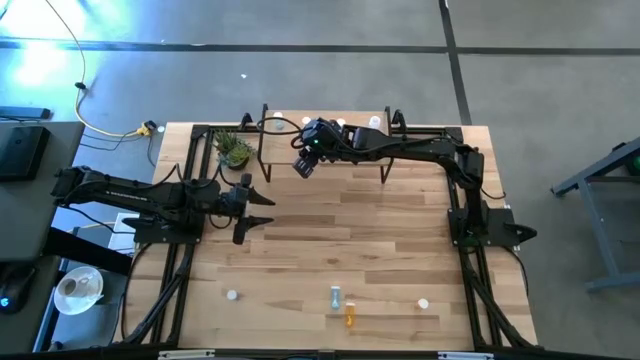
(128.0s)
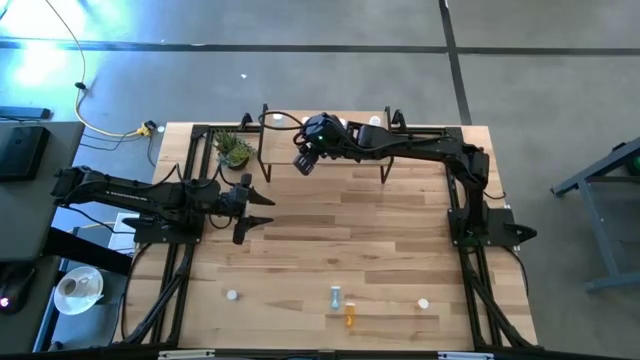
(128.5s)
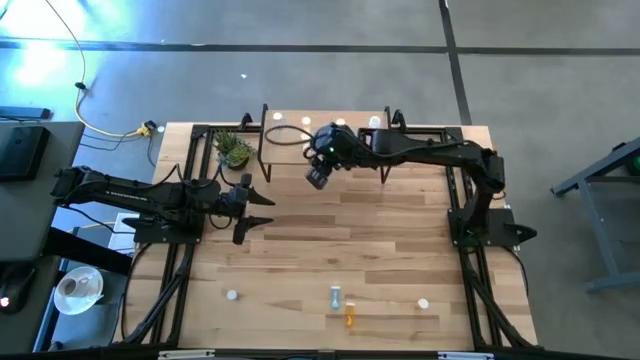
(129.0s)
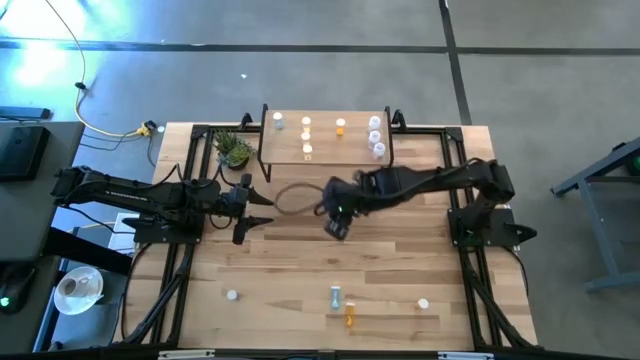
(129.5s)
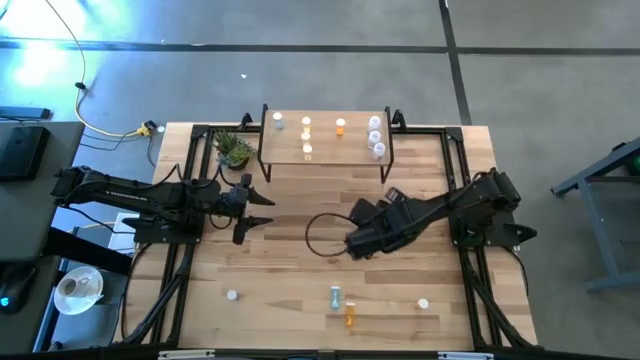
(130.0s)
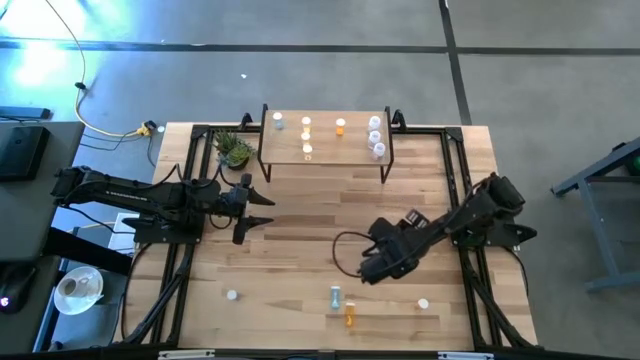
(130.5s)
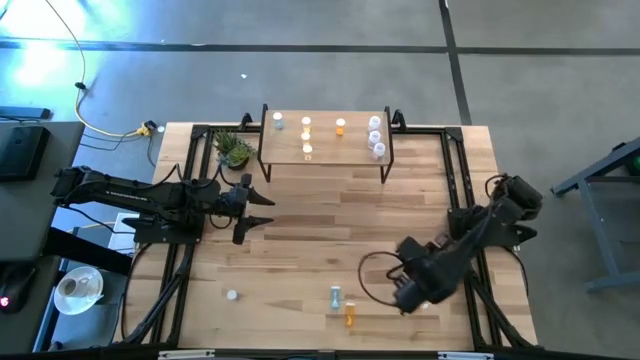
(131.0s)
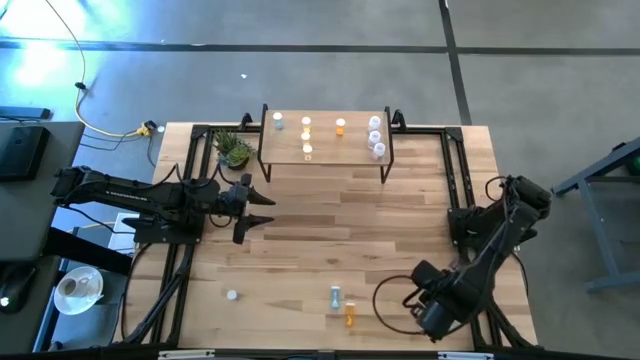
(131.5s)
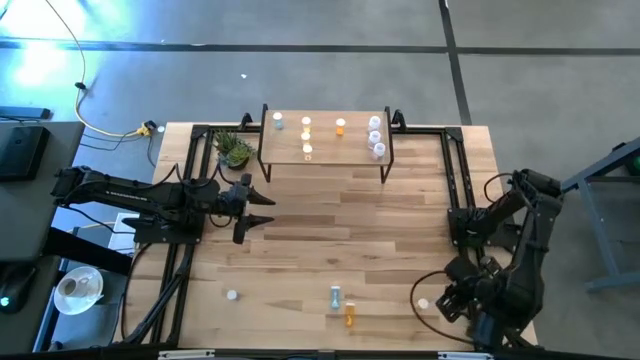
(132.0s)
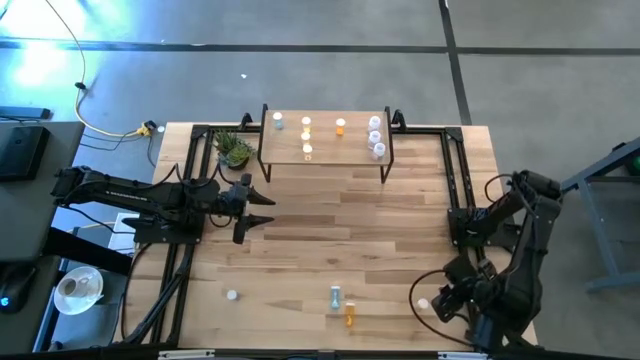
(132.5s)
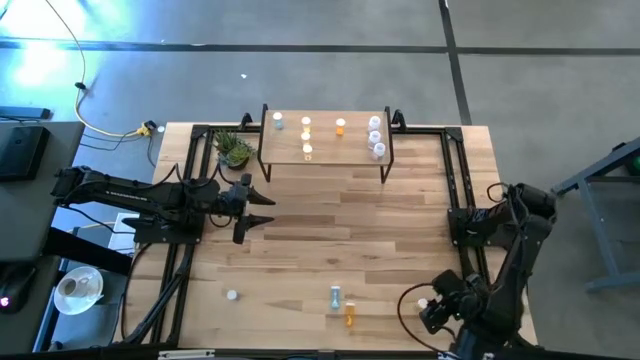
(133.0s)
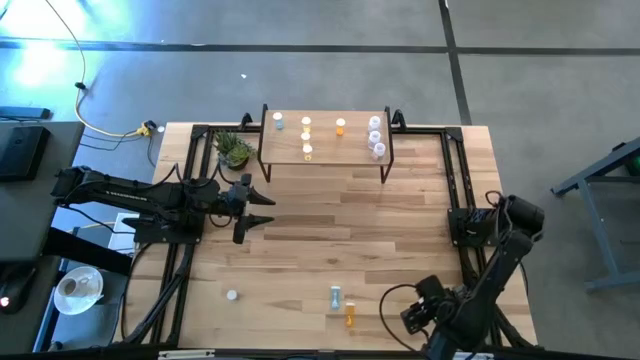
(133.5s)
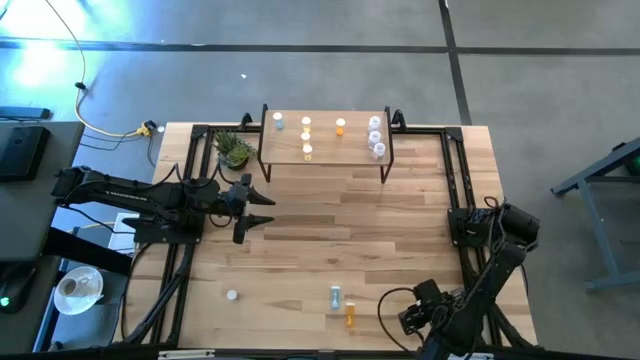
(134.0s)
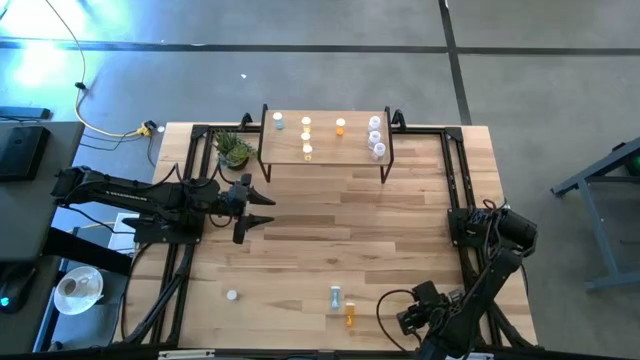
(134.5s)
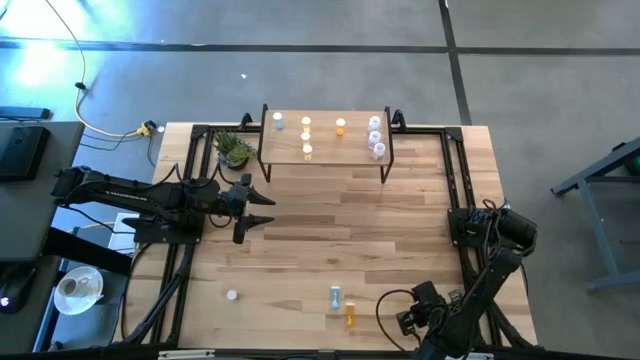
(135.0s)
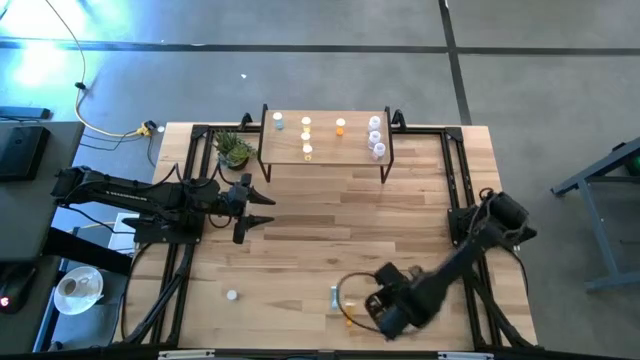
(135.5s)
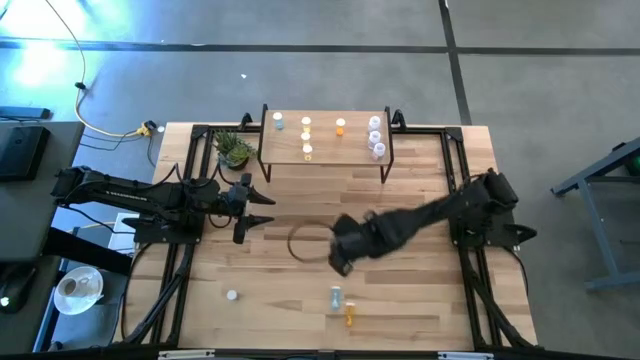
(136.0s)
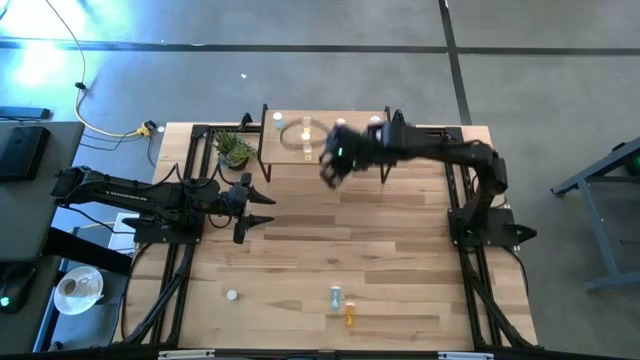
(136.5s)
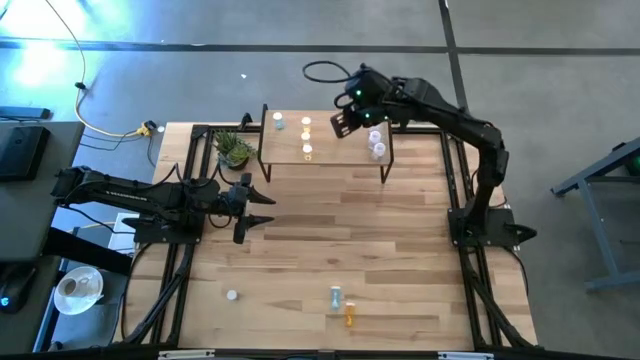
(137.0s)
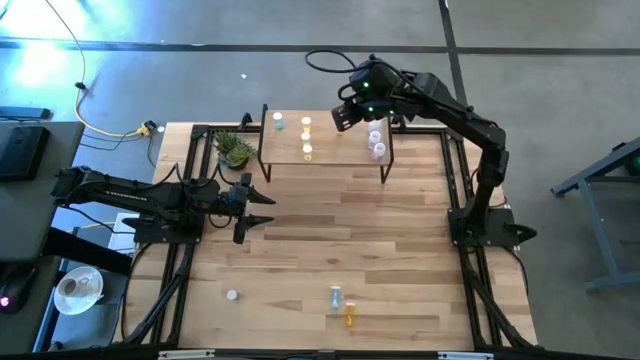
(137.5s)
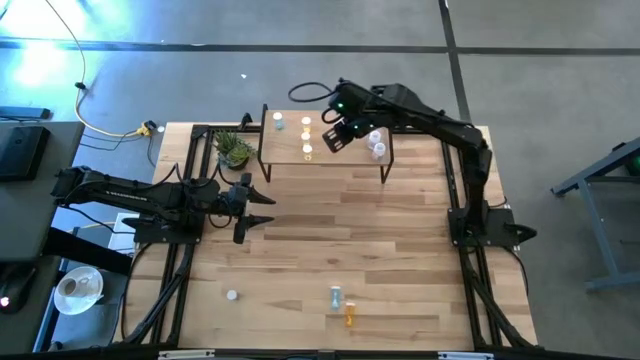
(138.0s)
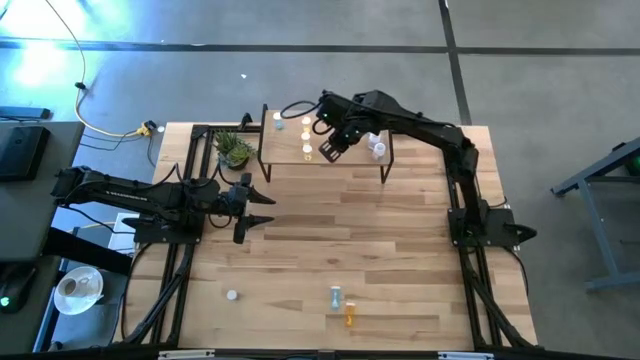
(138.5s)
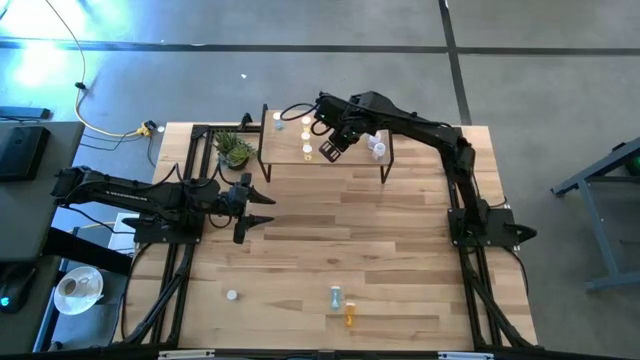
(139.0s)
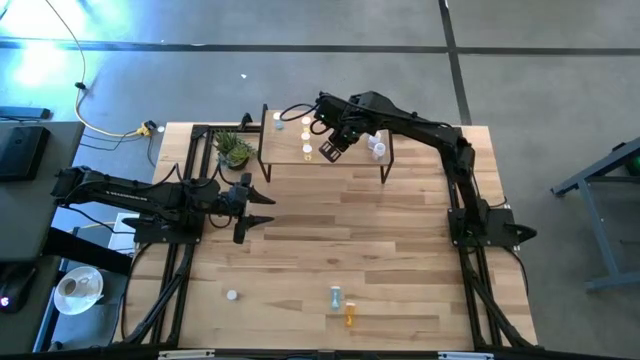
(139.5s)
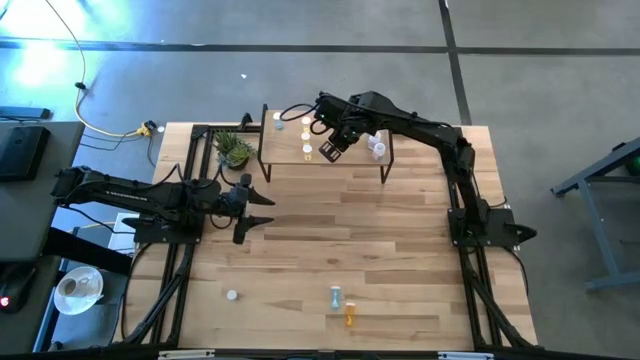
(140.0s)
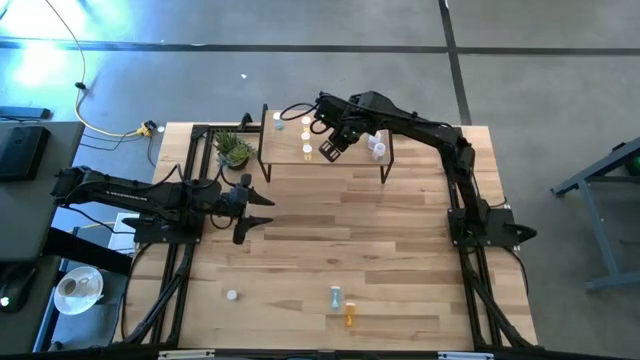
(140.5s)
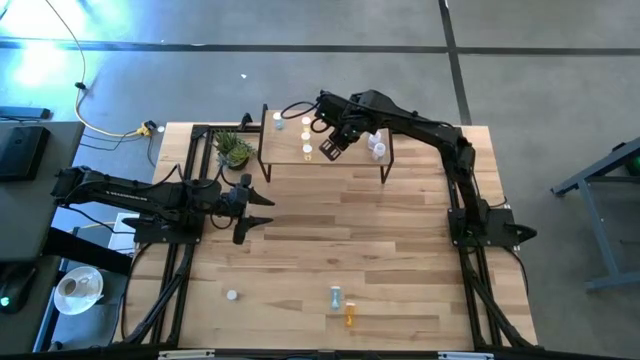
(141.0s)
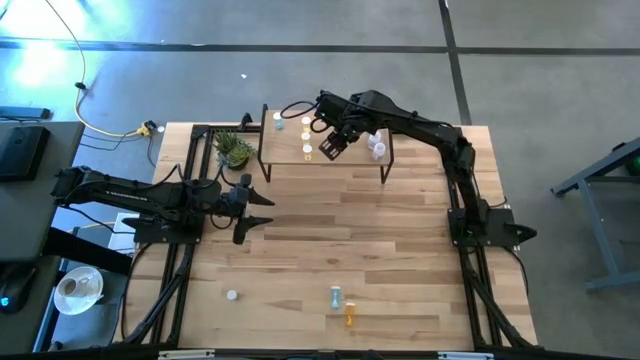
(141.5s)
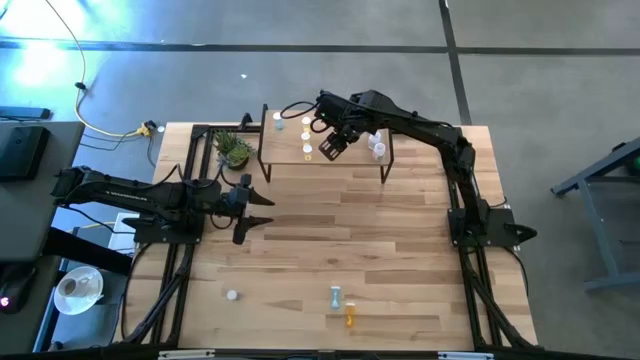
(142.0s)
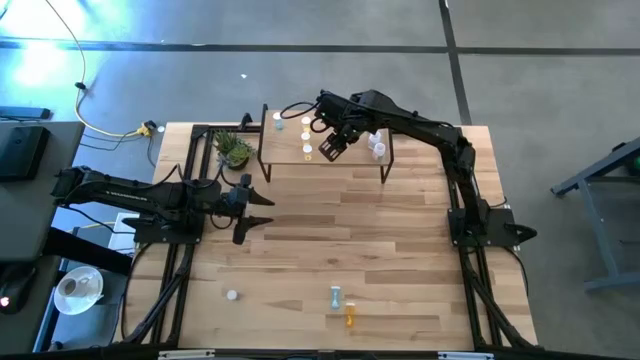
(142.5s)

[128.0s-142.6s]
Task: Pick and place medicine bottles onto shelf by color
Put the right orange pill bottle on the shelf aligned with the orange pill bottle

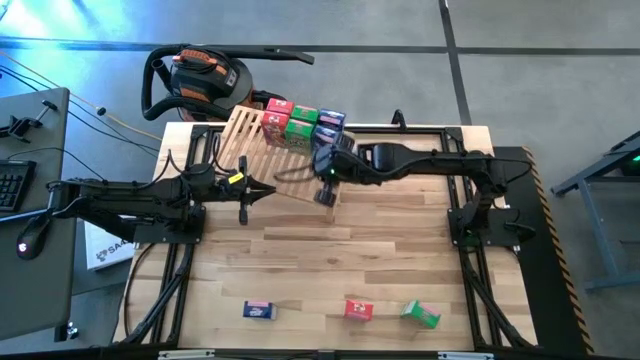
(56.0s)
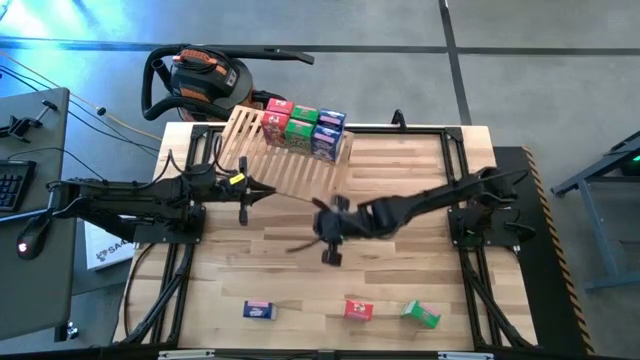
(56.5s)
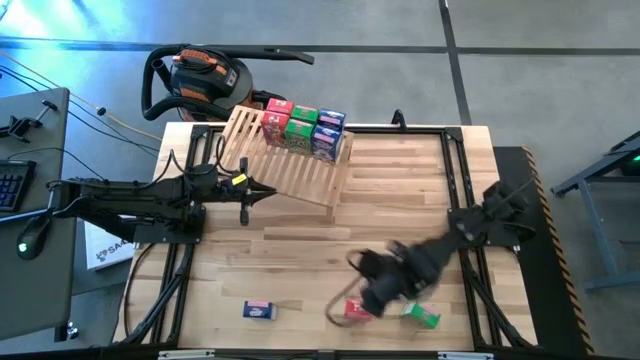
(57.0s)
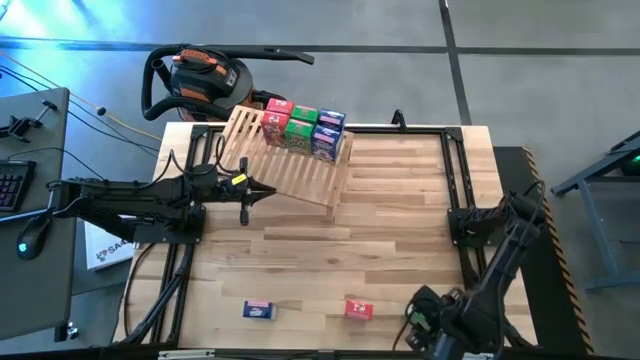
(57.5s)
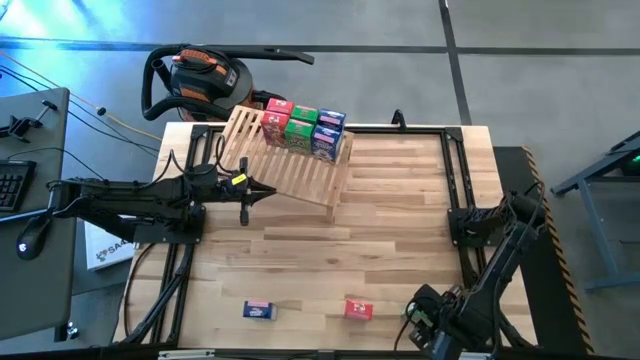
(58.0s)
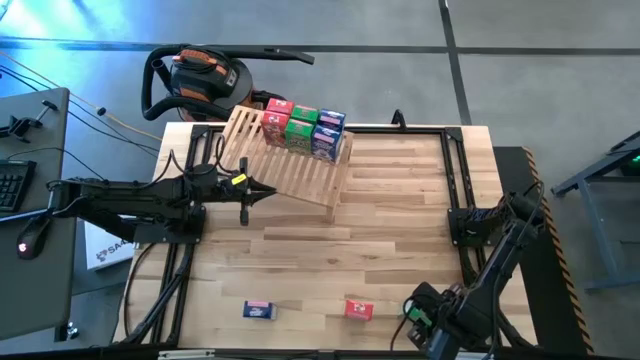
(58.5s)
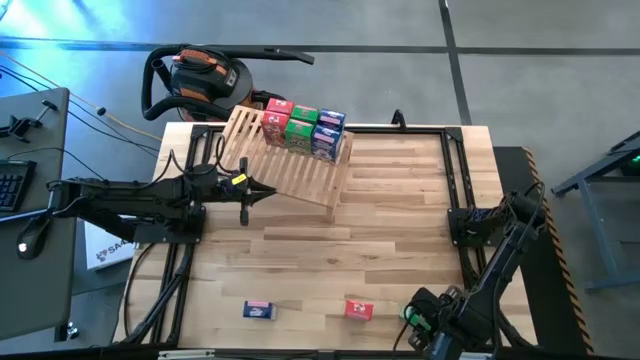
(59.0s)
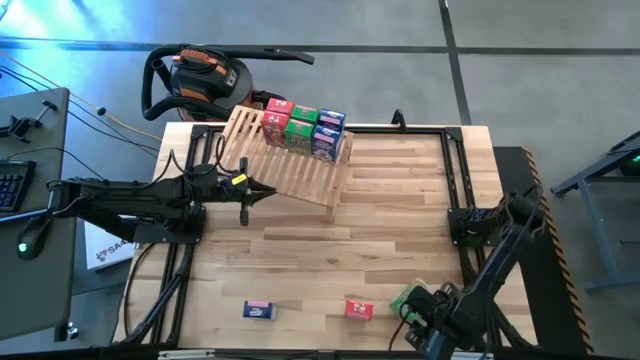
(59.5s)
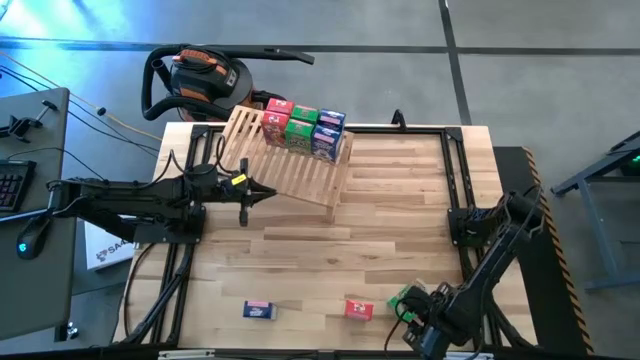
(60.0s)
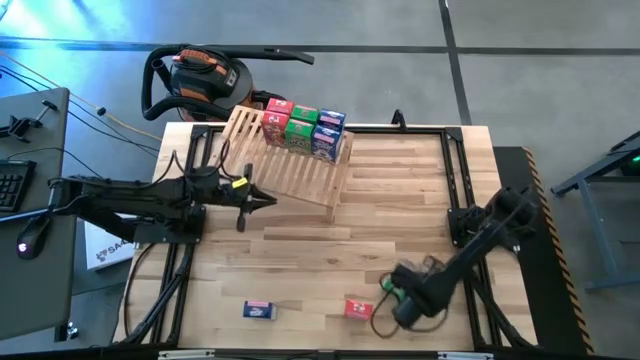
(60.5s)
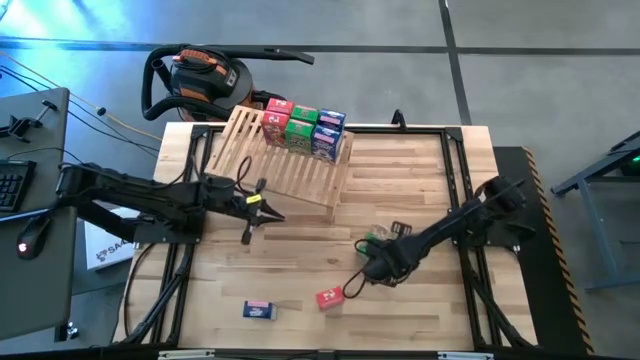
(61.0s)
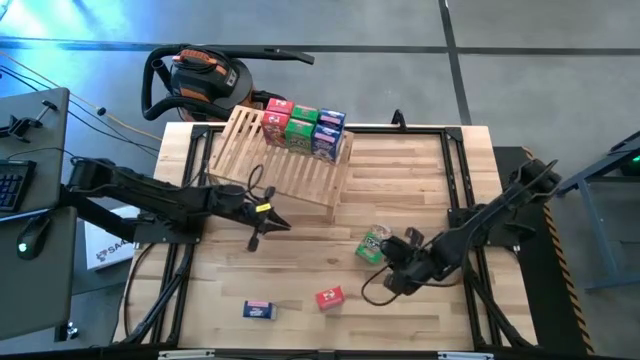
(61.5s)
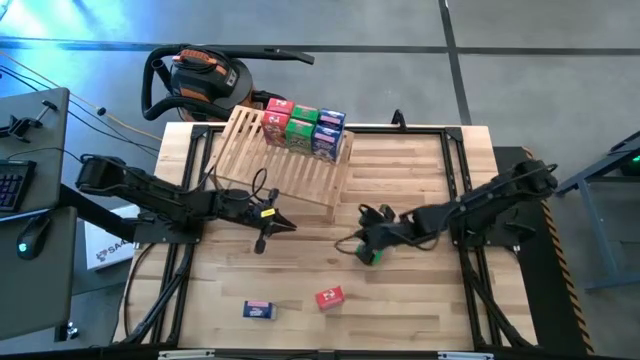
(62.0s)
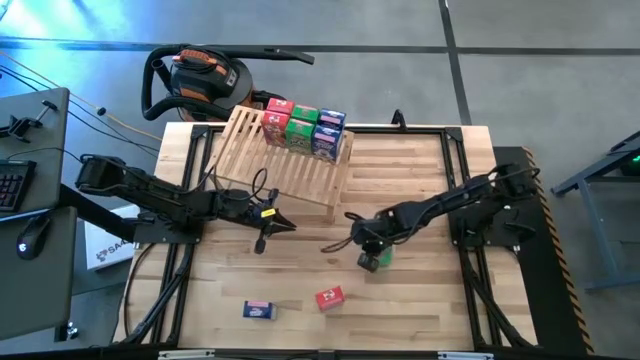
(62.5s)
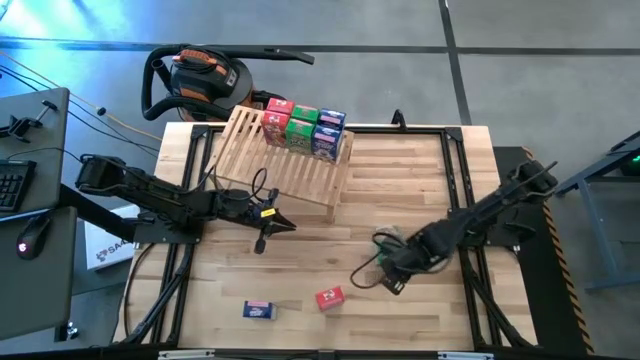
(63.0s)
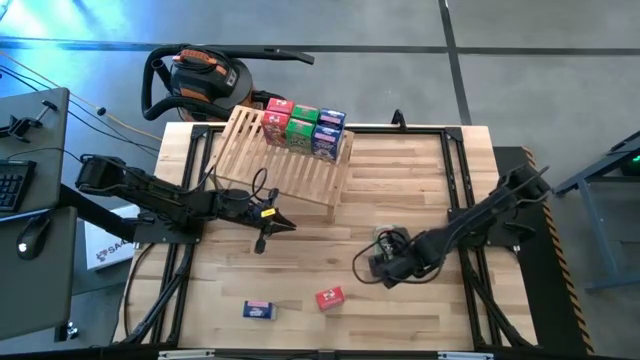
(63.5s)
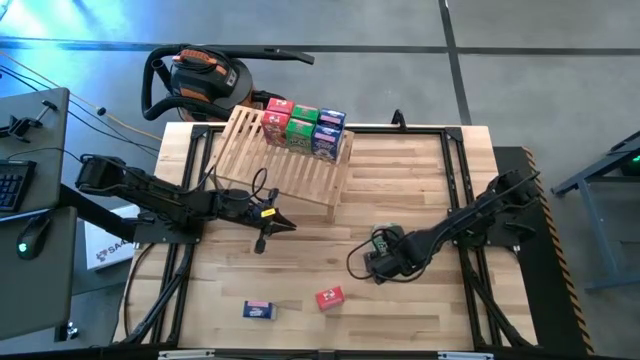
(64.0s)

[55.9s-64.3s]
Task: Stack cereal on shelf
Put the green cereal box aligned with the other green cereal box on the shelf
